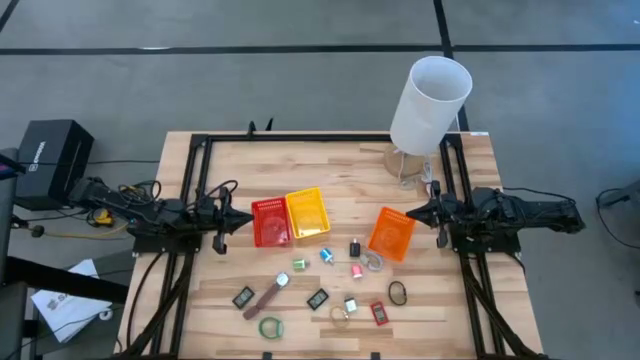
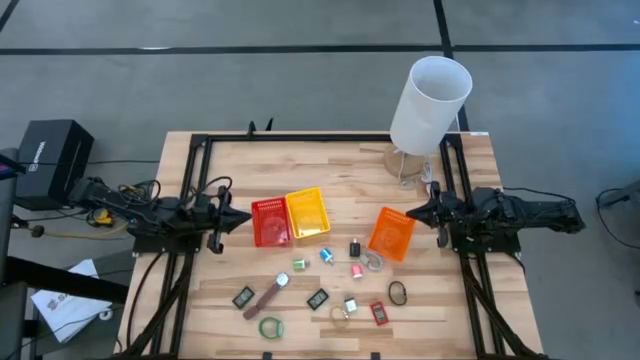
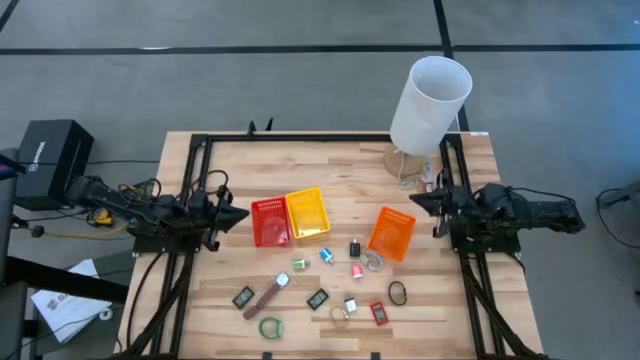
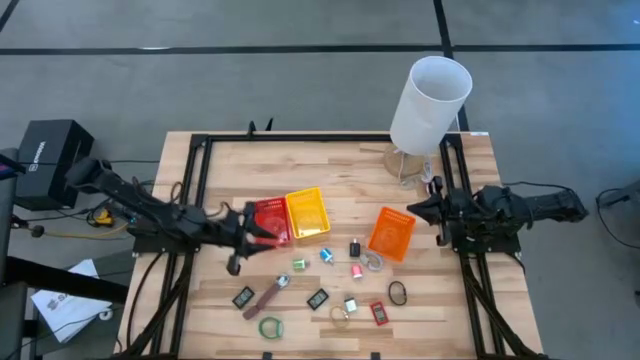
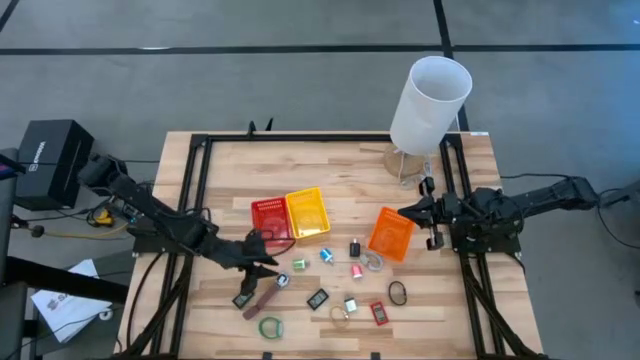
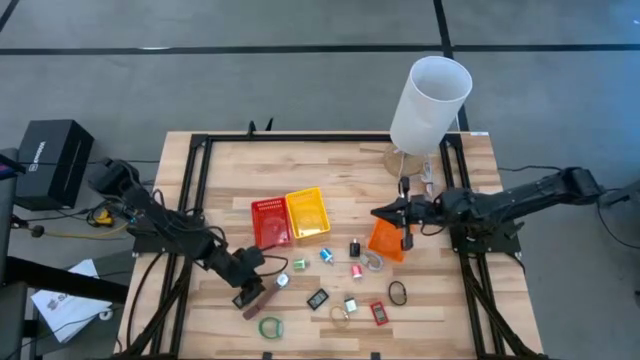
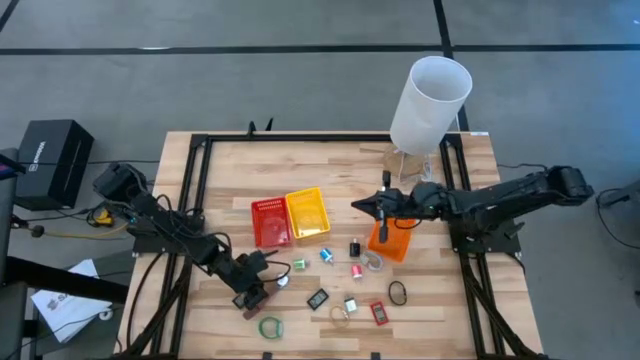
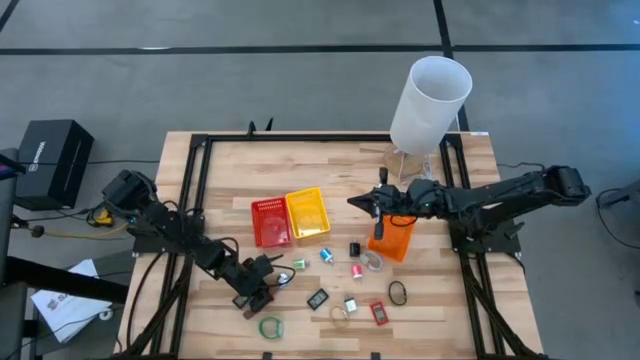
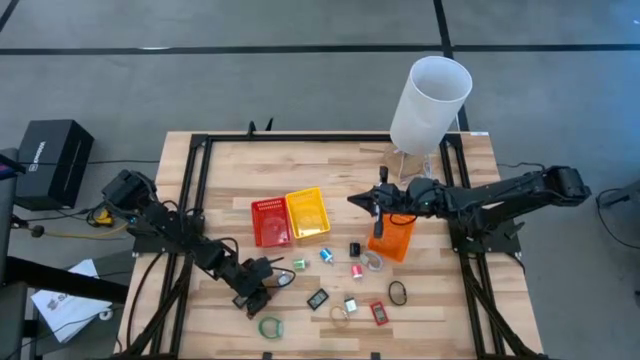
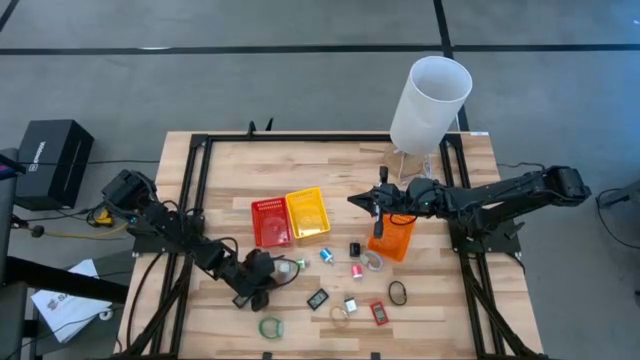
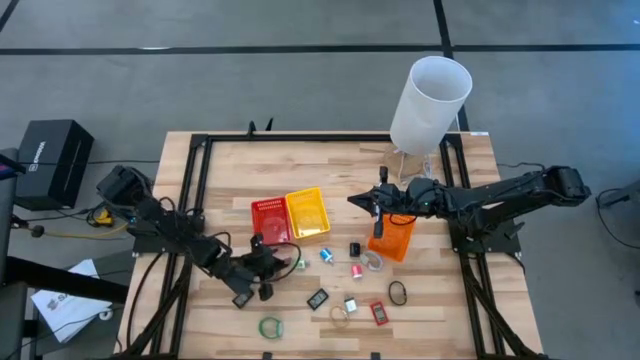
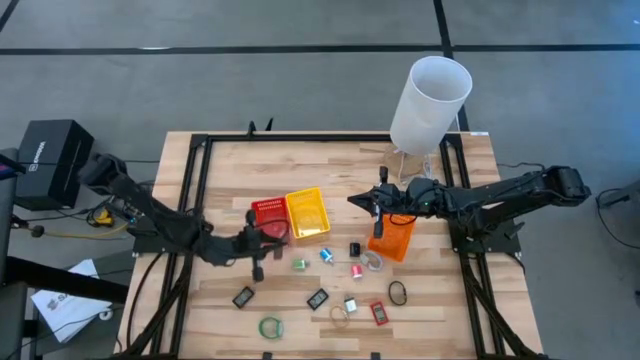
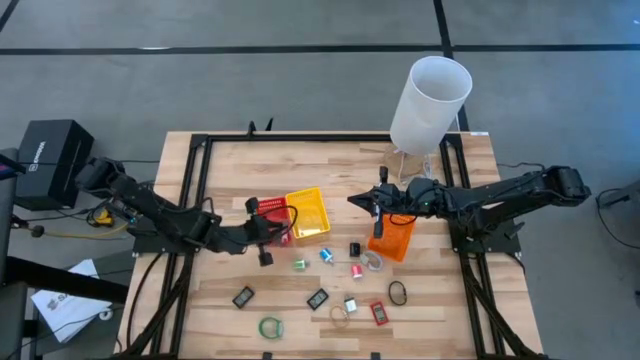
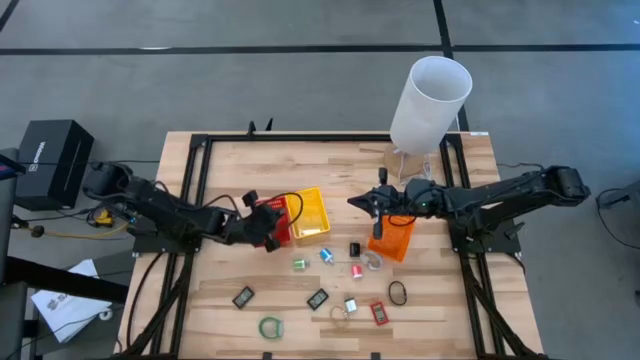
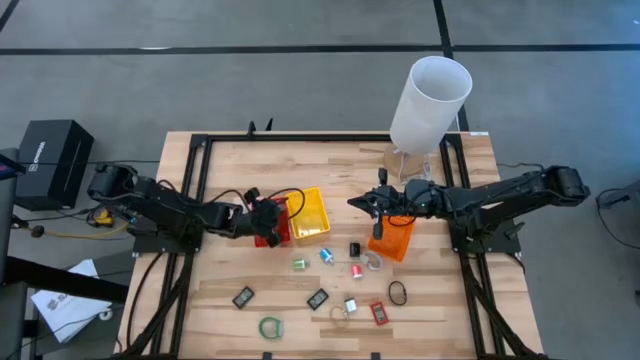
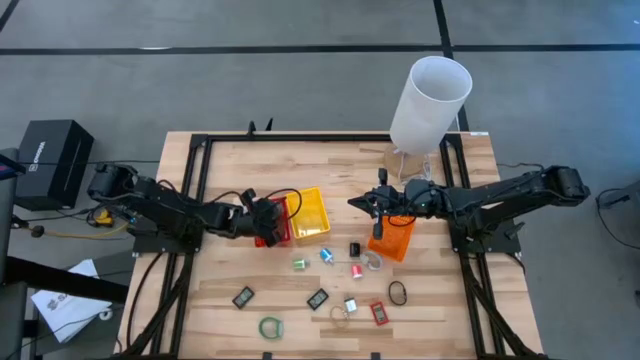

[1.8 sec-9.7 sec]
Task: Pick & Place Office items
Put the brown wrist watch into the red bin

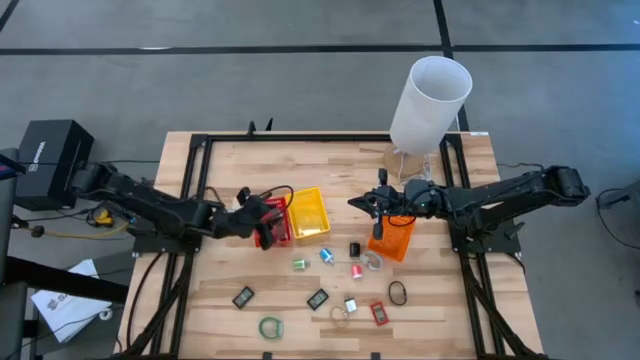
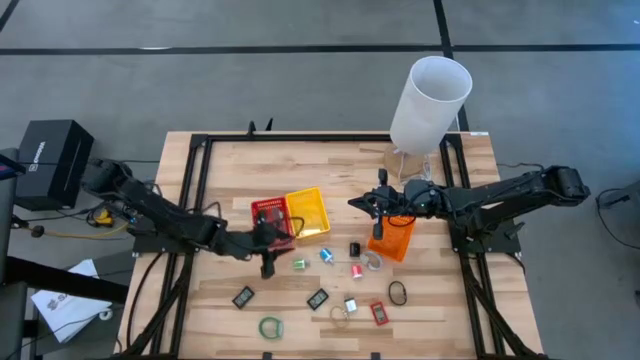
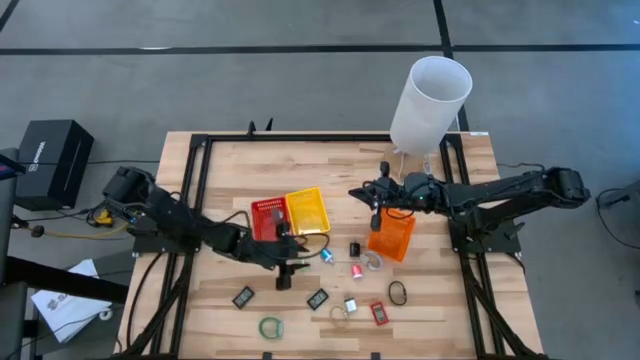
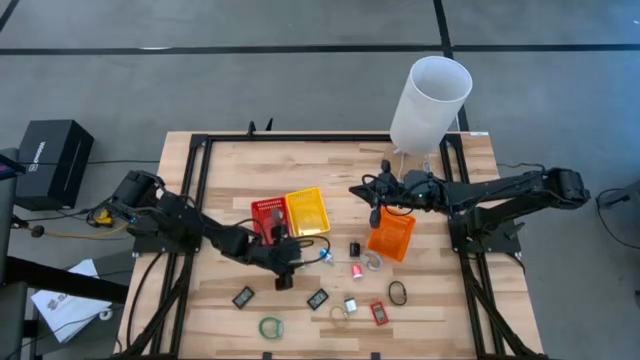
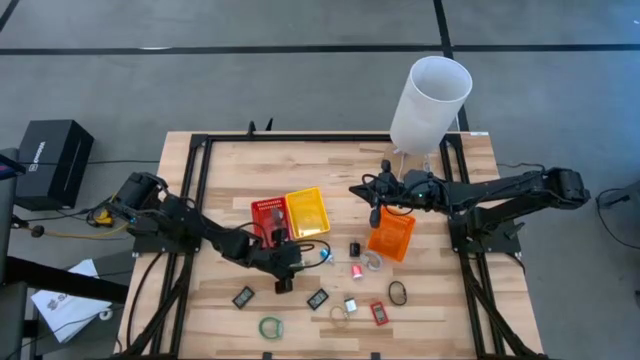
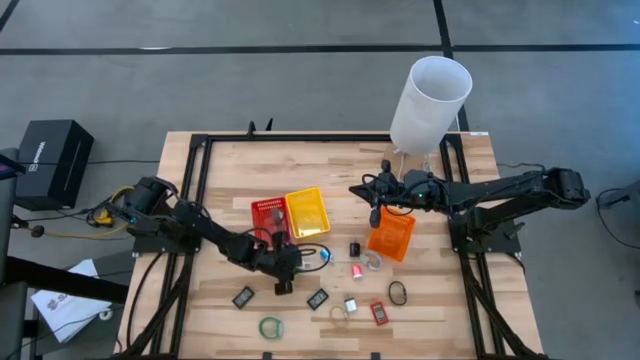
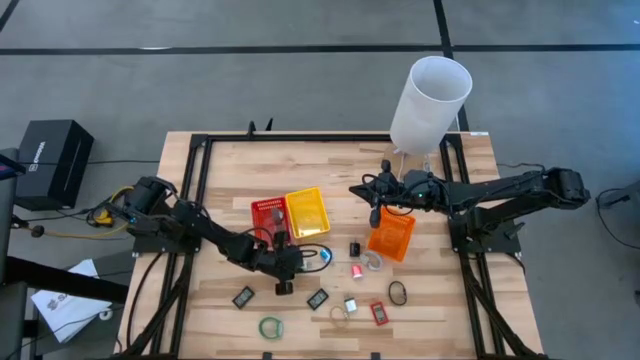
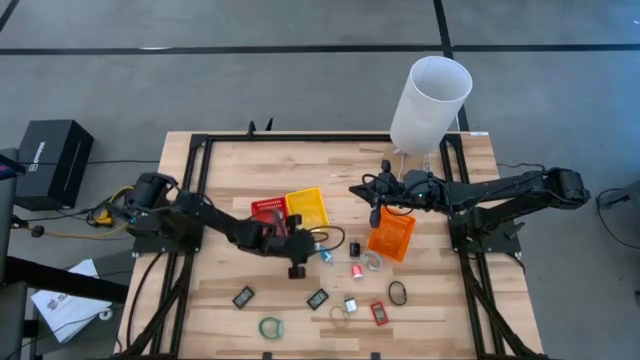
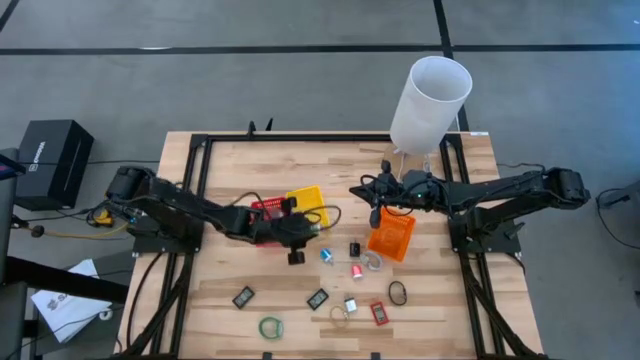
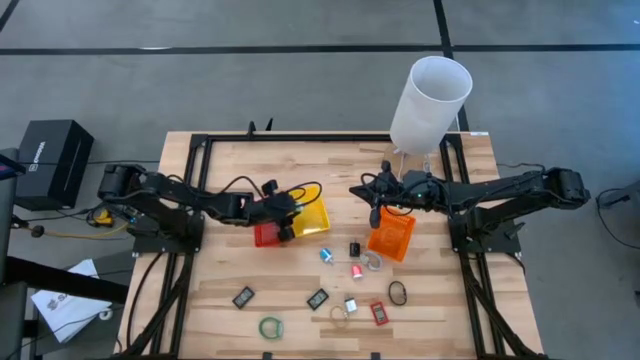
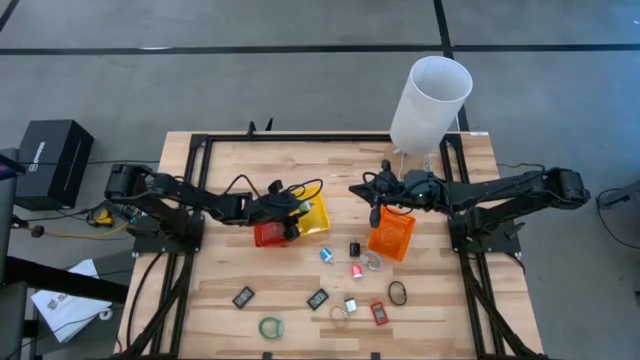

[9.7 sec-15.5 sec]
Put the green charger adapter into the yellow bin

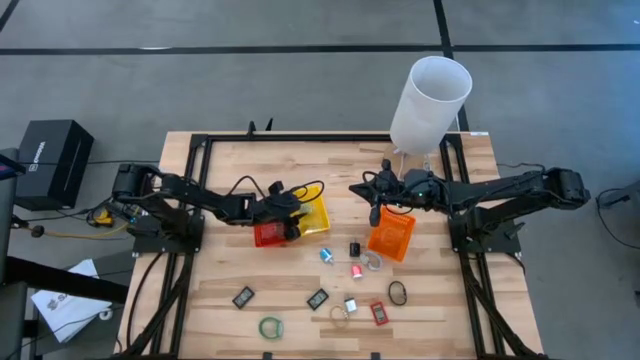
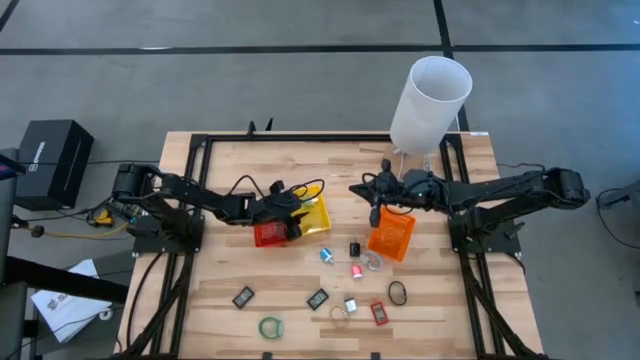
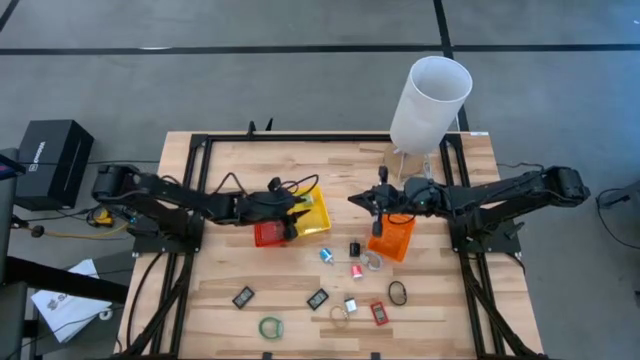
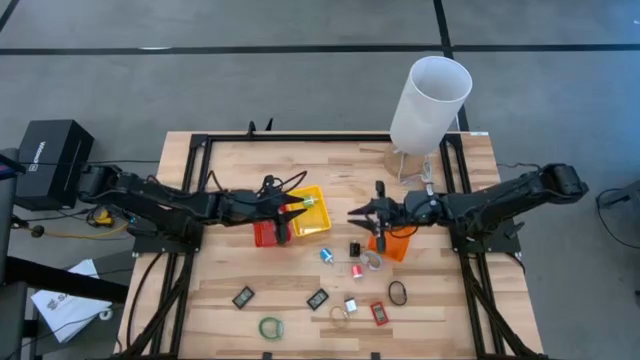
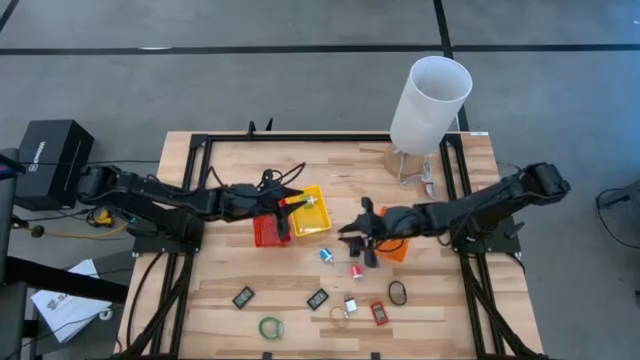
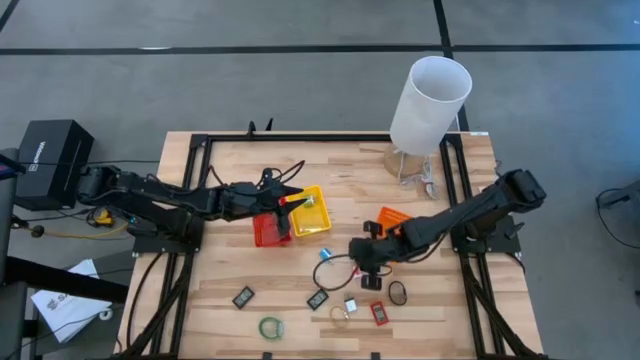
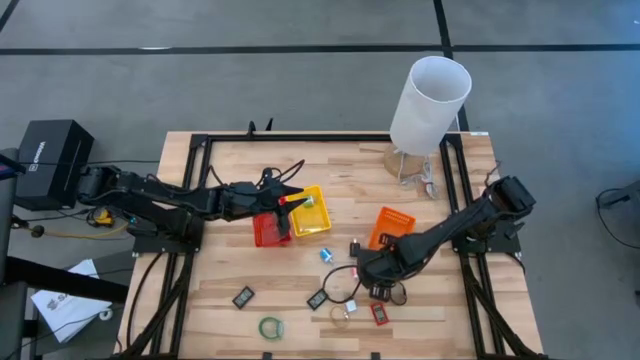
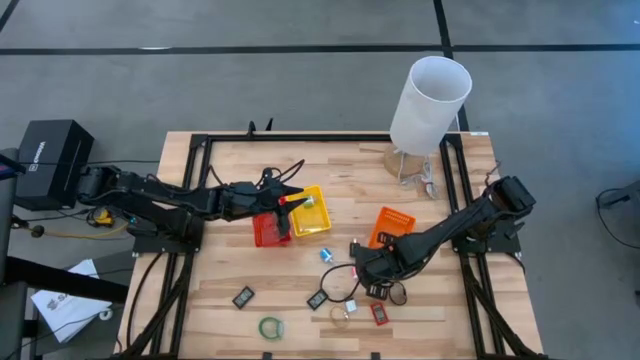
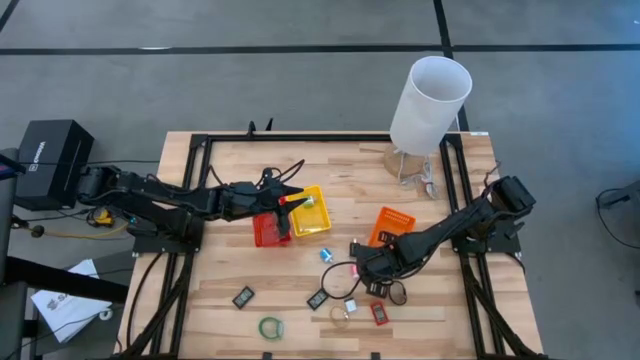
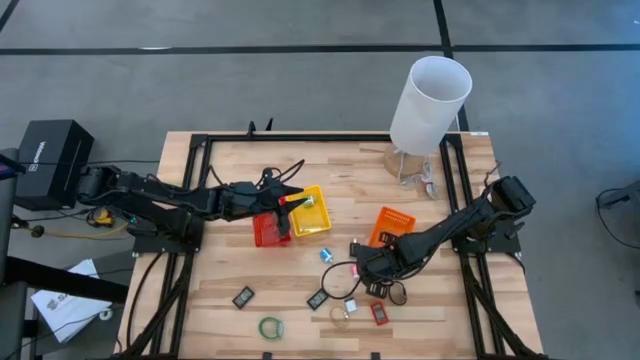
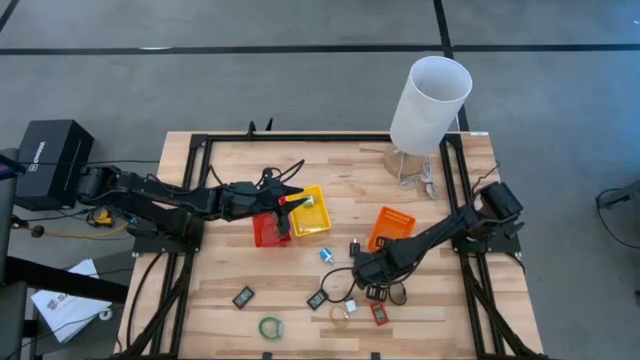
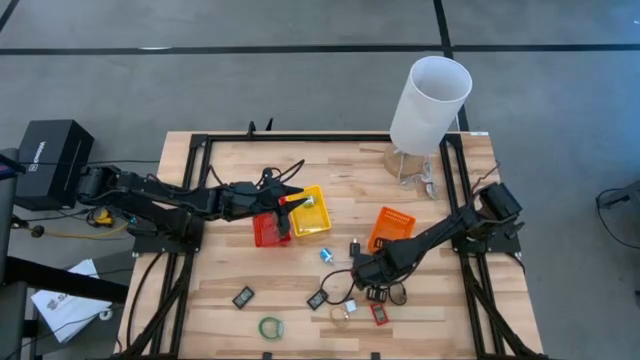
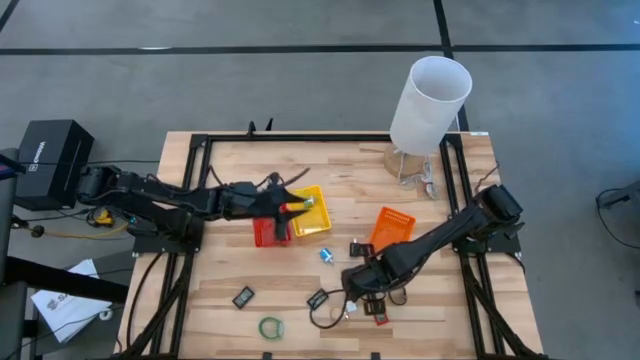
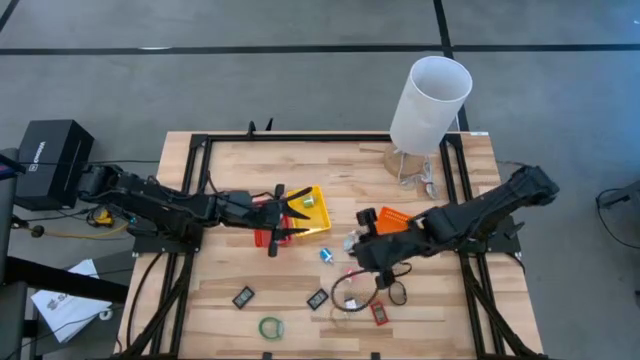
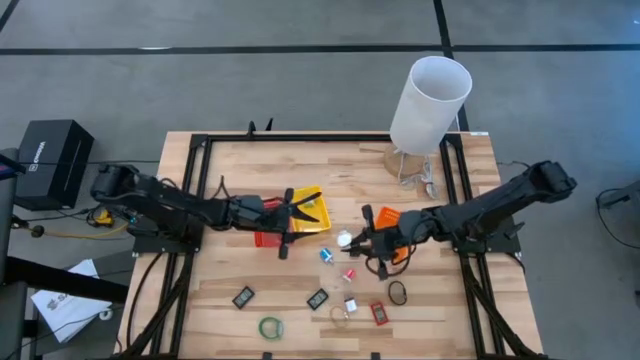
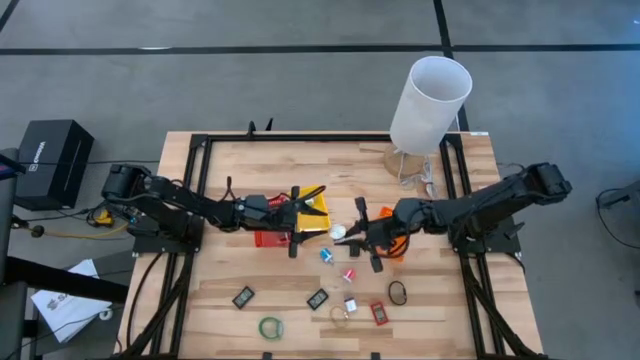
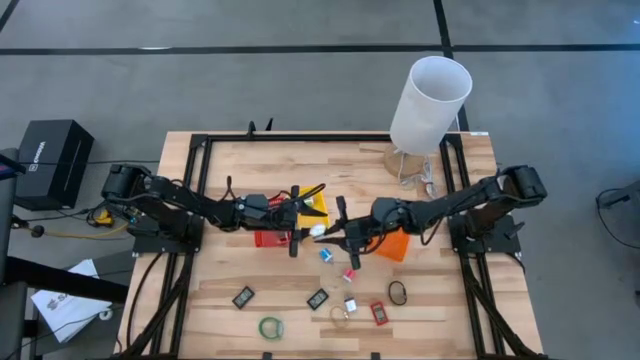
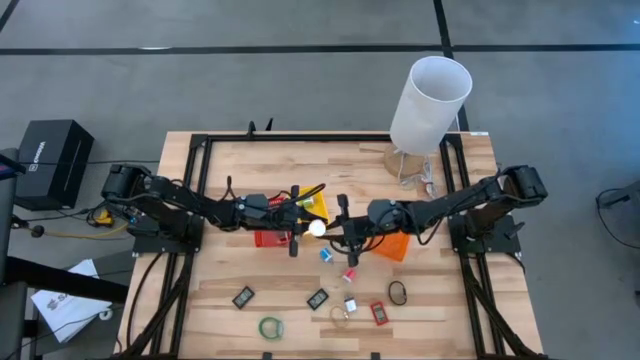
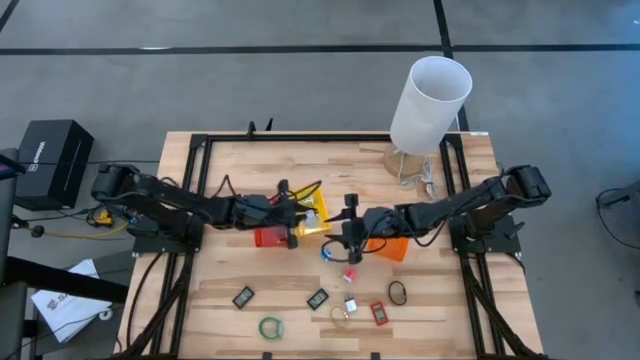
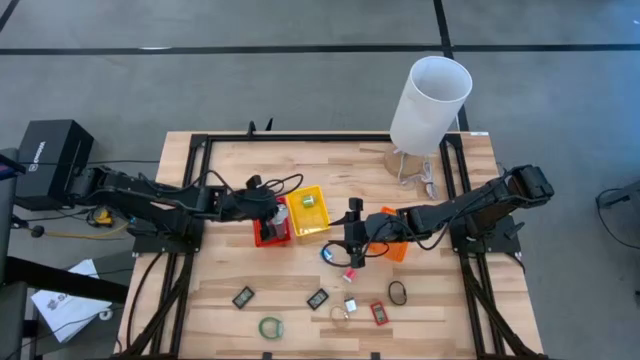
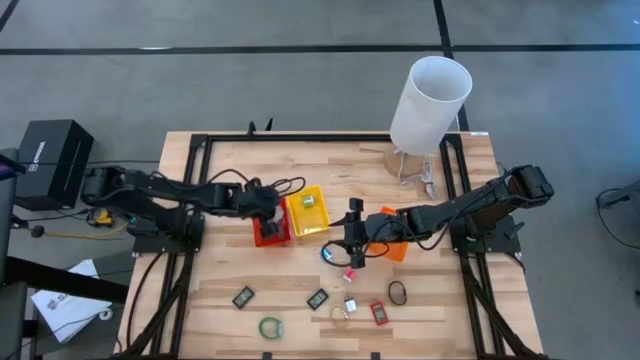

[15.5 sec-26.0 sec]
Put the white wrist watch into the red bin
